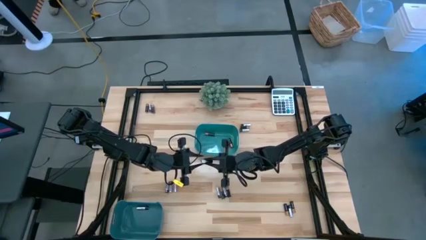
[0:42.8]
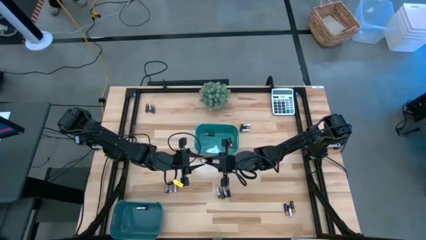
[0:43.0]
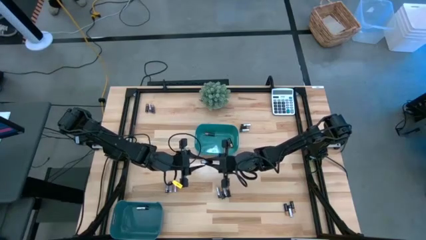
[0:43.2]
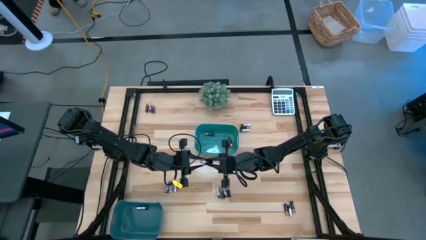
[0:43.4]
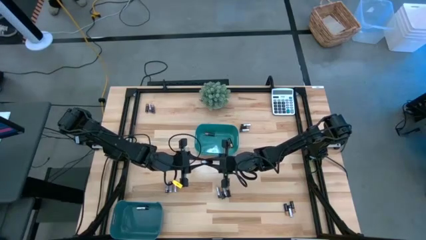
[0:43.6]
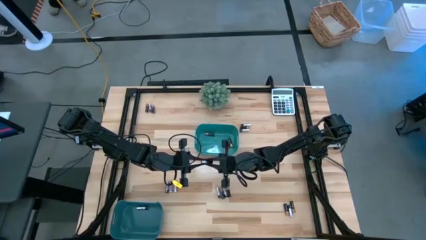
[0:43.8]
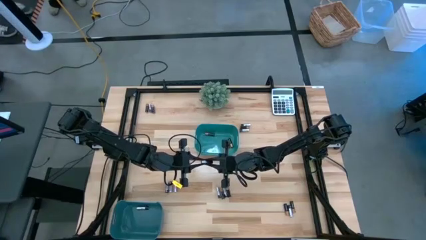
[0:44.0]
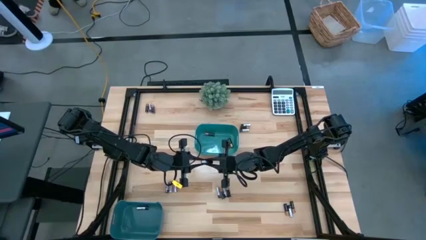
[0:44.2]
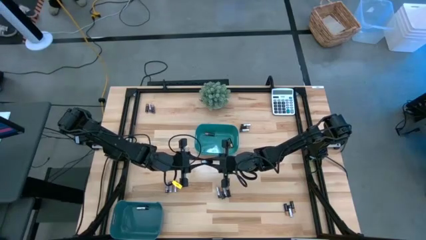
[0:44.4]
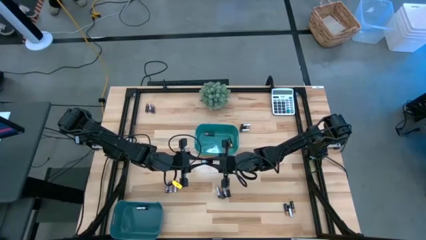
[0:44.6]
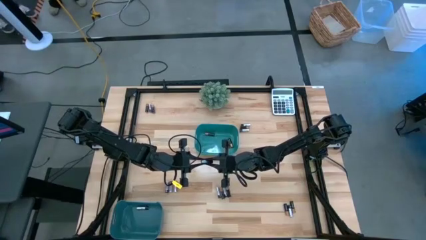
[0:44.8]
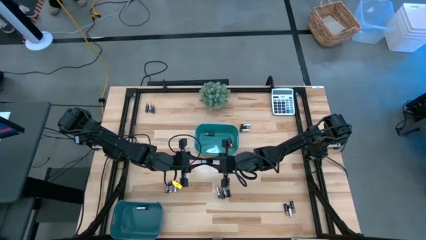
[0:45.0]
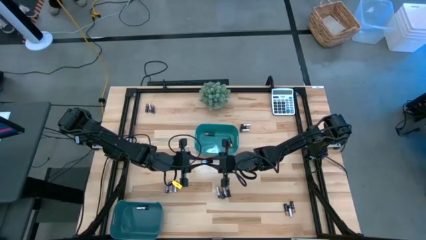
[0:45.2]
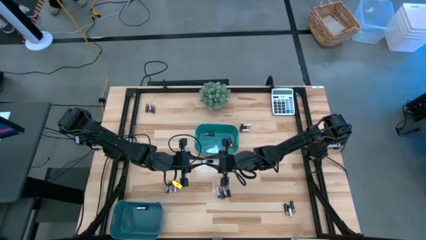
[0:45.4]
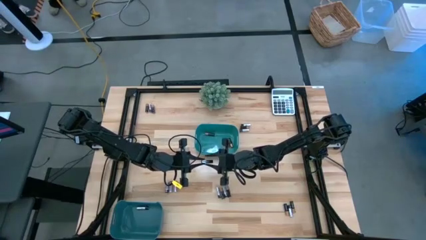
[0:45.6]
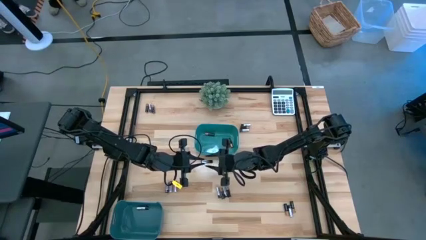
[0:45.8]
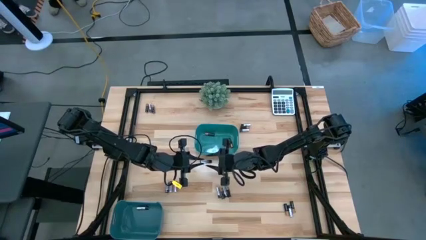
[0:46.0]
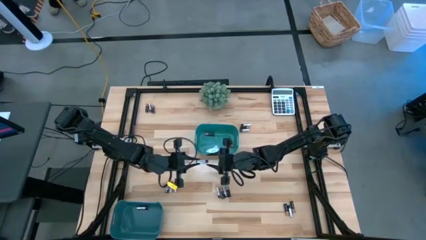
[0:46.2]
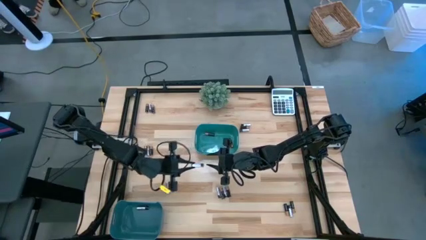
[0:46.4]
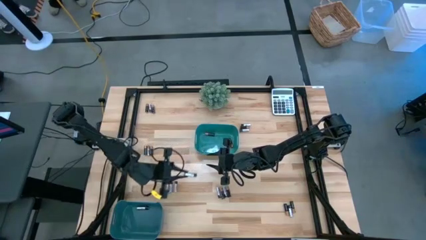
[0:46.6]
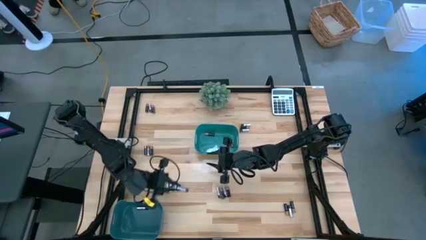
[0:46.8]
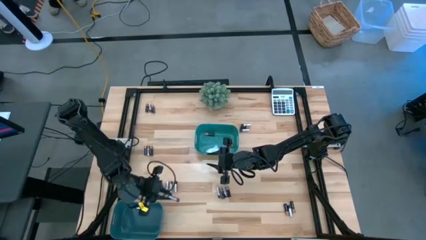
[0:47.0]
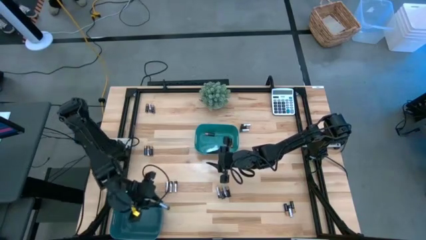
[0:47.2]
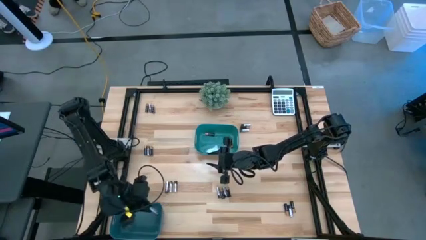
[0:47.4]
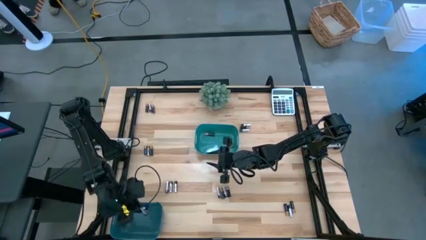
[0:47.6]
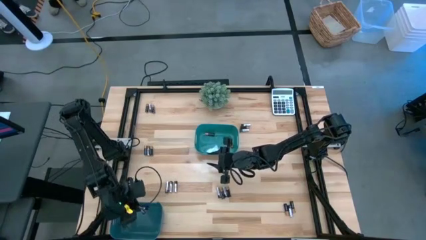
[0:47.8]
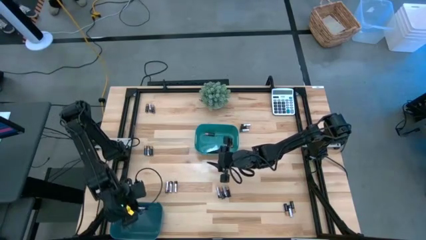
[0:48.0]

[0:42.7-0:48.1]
Task: Sort batteries
Put the silver battery into the blue bin

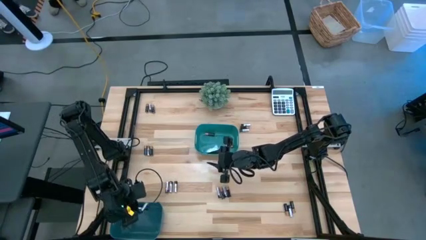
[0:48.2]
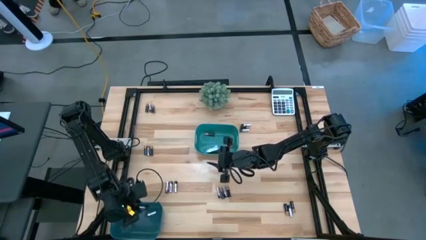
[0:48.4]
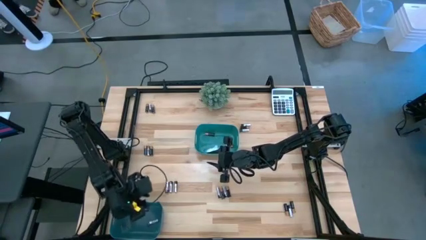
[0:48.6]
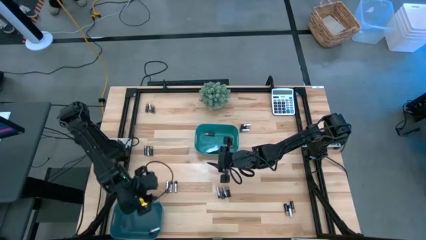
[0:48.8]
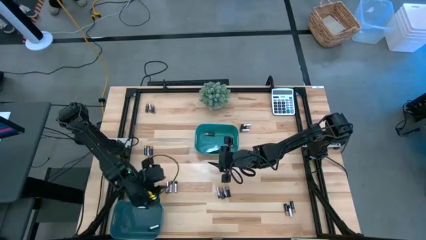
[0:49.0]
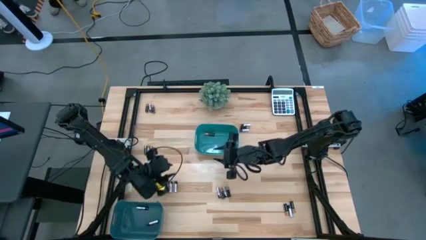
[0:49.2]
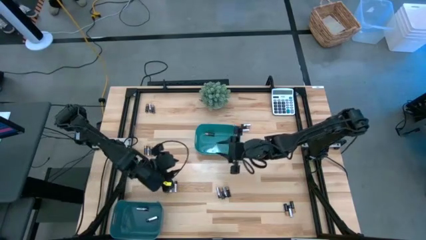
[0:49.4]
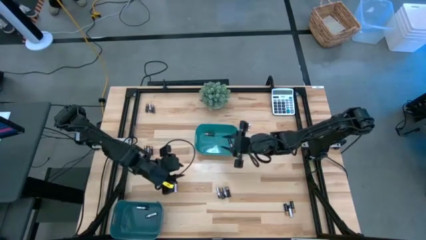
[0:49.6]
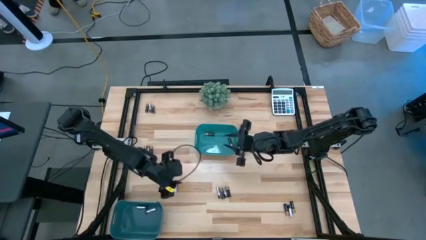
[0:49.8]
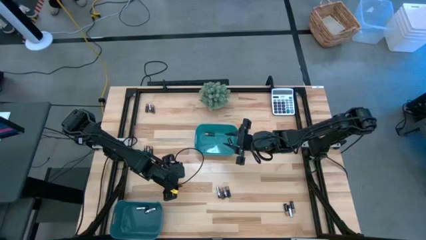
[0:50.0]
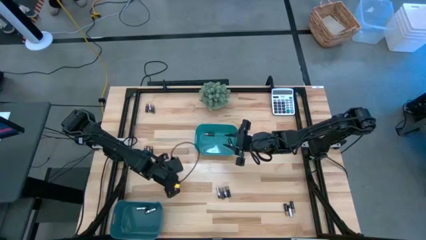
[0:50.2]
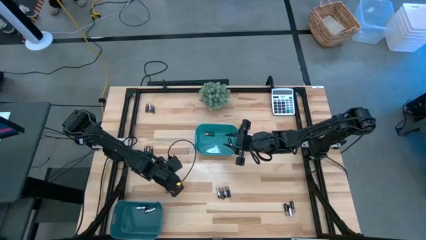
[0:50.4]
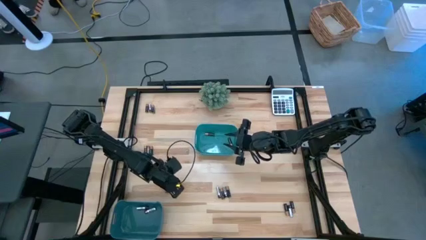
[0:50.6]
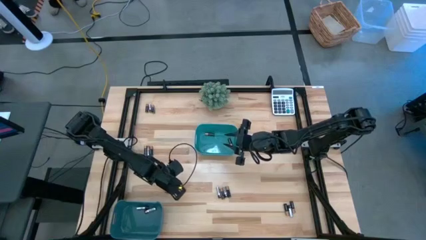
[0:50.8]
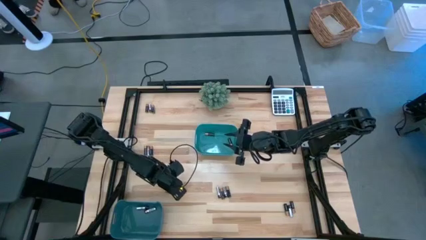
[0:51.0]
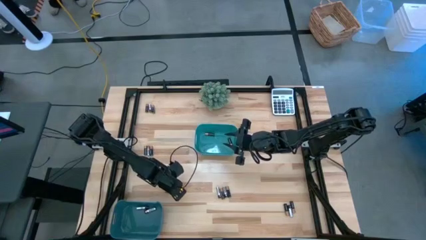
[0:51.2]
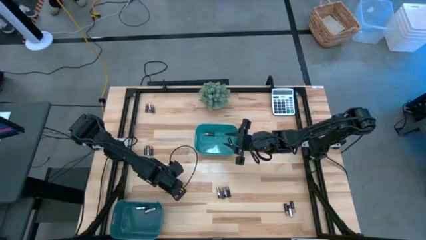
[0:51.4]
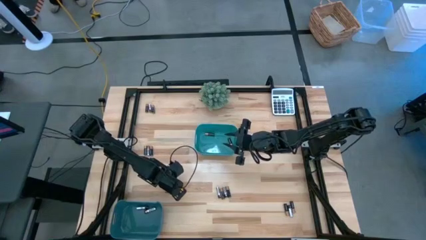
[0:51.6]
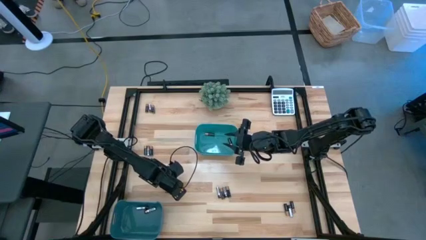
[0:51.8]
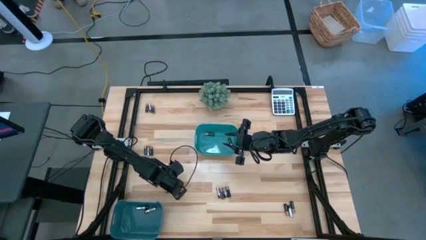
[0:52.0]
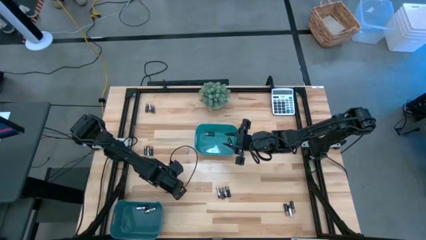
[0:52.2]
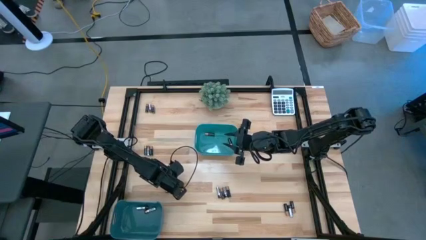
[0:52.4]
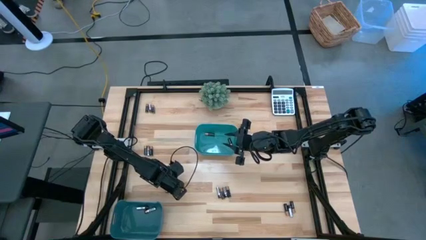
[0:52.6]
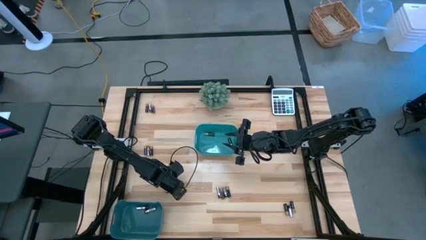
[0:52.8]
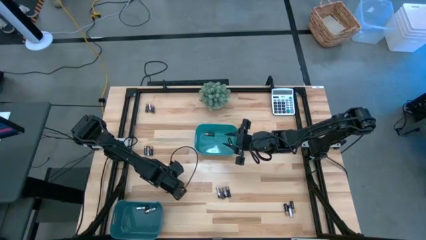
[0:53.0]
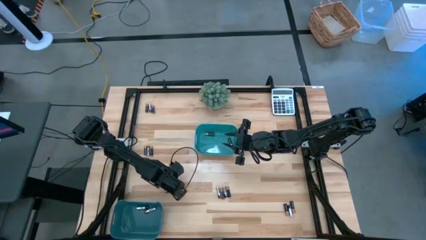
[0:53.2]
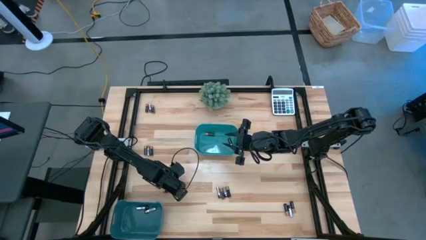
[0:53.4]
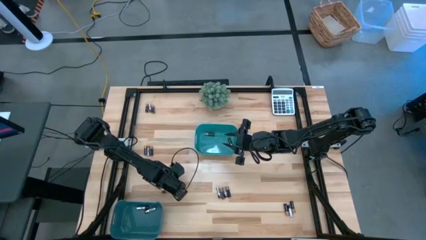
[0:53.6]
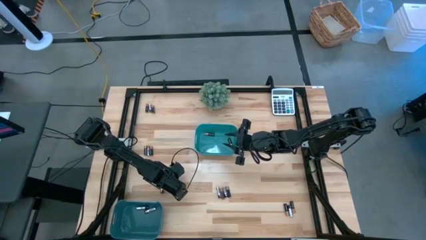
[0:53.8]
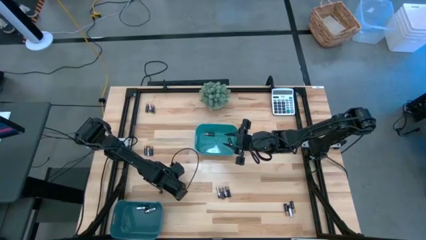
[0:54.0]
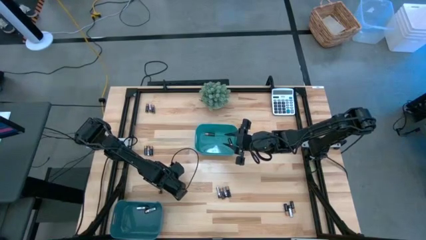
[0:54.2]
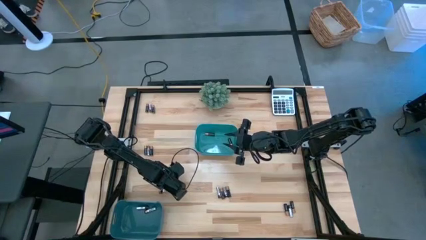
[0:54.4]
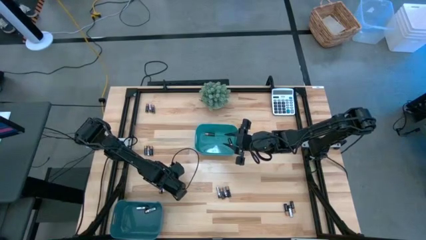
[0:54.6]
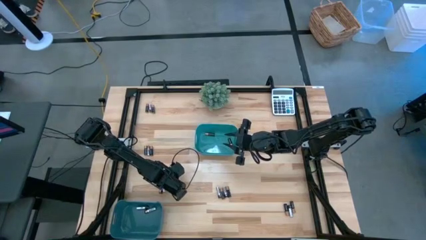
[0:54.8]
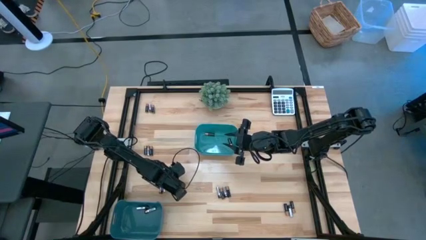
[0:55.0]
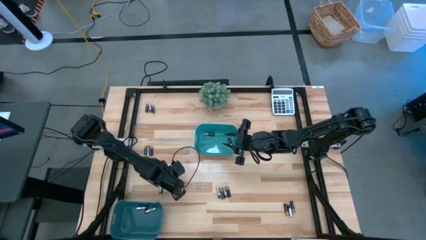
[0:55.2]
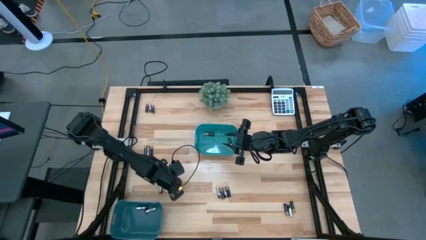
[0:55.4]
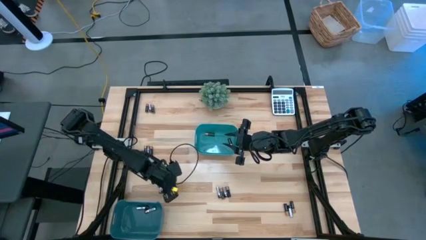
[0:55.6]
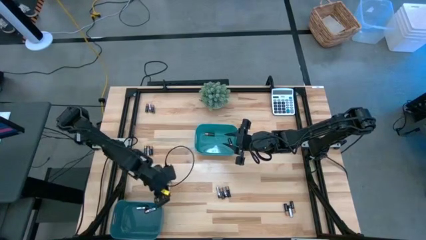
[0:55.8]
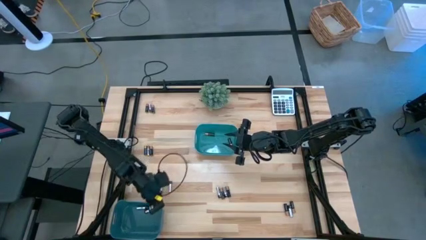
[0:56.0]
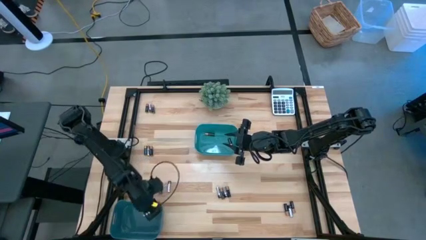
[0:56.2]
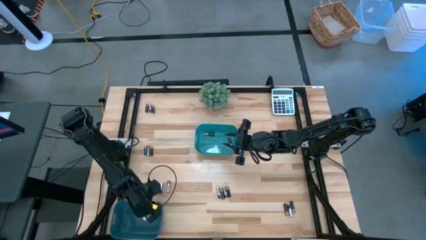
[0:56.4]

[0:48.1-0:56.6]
Put the silver battery into the blue bin

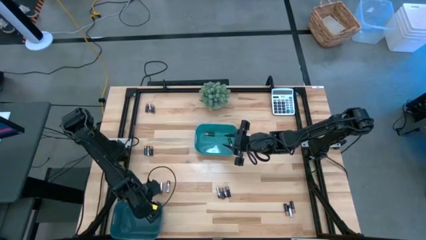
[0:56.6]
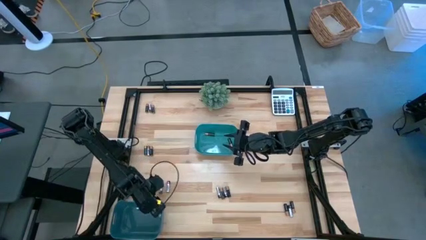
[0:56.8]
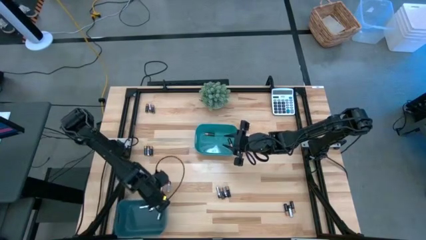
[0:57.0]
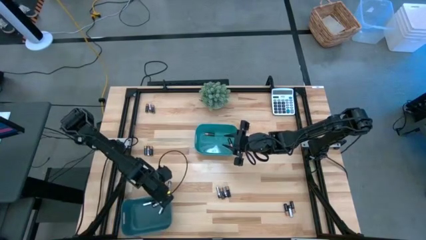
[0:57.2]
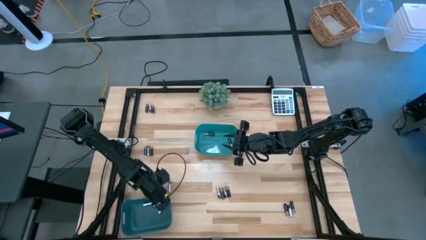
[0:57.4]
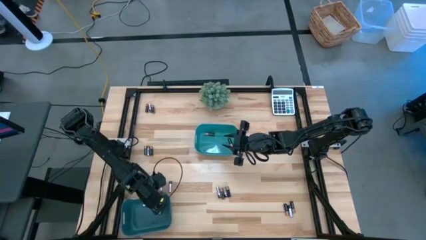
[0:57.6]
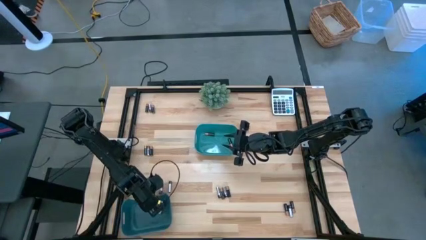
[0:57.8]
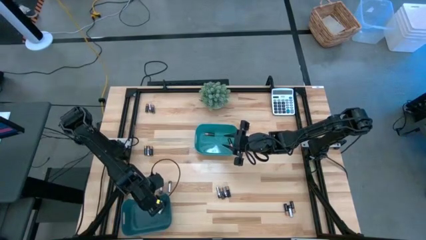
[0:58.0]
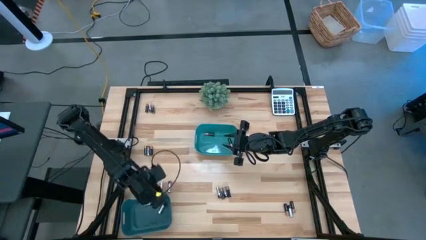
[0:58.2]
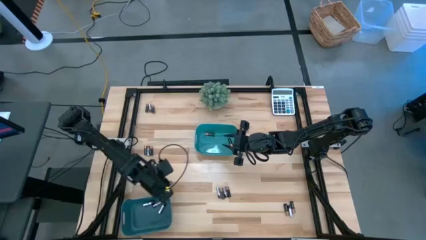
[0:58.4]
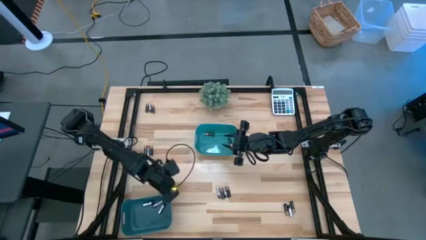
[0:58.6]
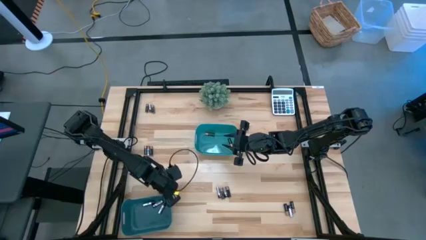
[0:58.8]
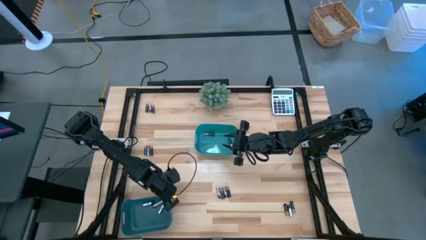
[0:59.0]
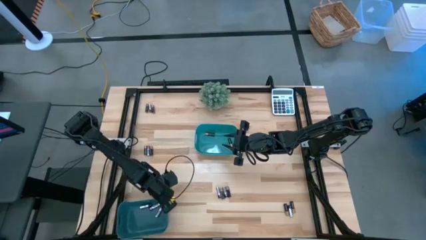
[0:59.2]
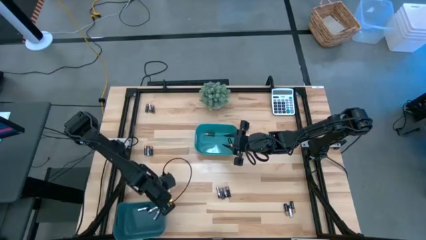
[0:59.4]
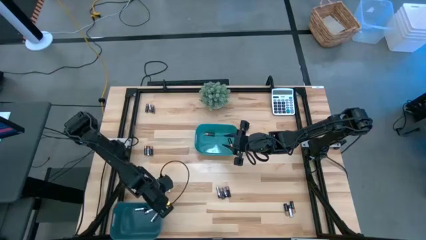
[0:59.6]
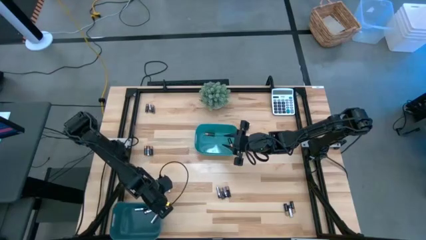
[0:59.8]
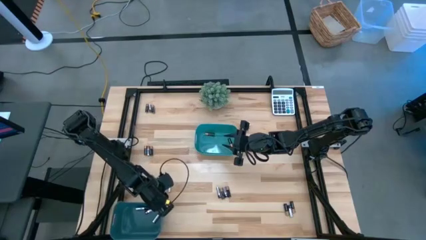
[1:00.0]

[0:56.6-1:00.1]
Adjust the blue bin
